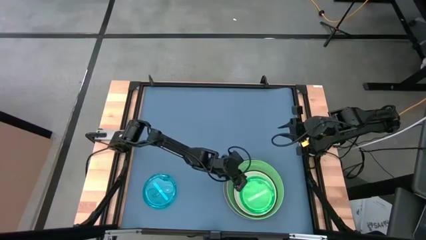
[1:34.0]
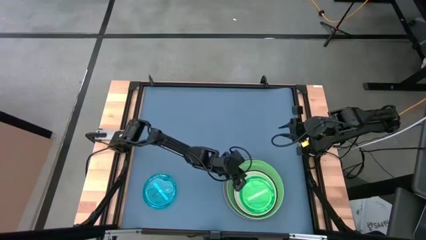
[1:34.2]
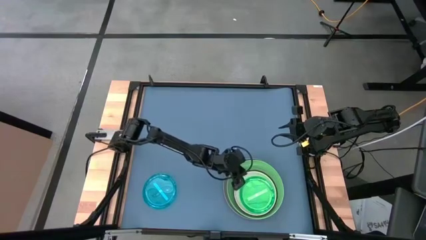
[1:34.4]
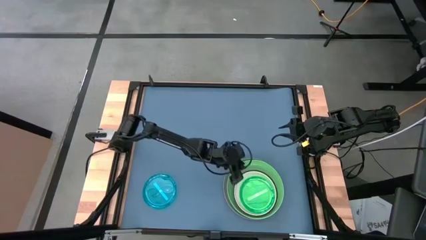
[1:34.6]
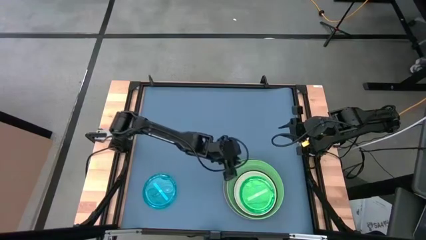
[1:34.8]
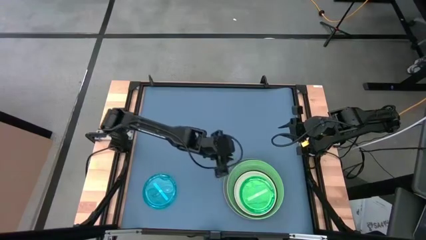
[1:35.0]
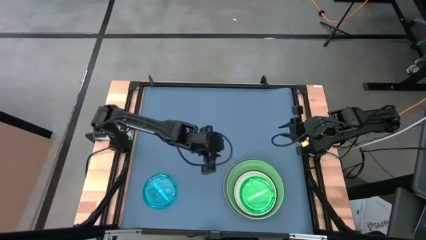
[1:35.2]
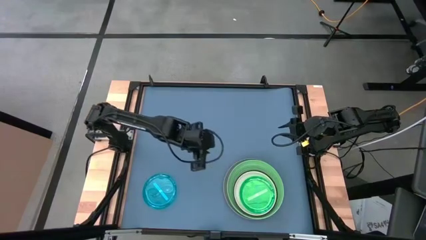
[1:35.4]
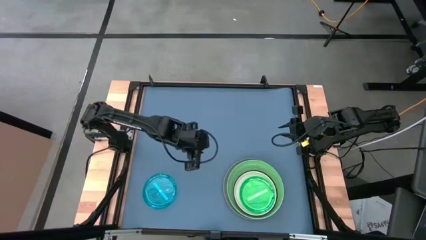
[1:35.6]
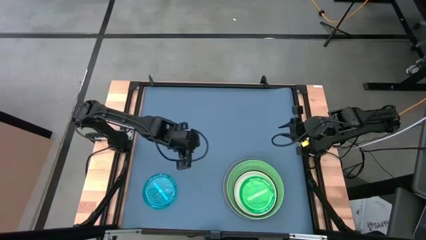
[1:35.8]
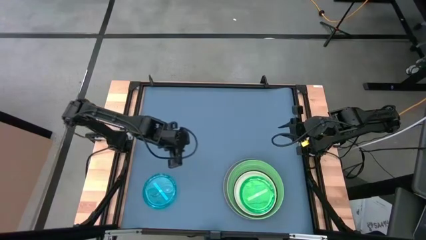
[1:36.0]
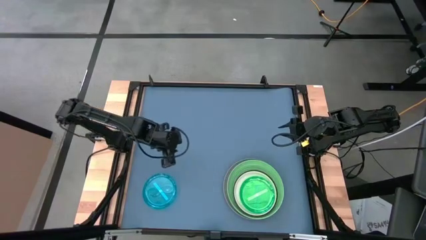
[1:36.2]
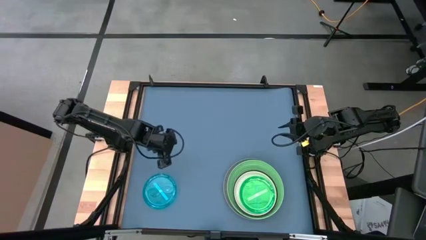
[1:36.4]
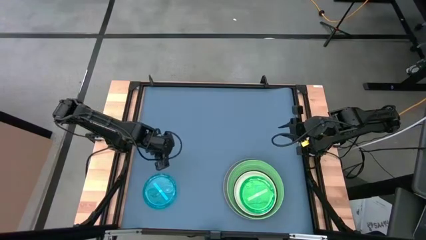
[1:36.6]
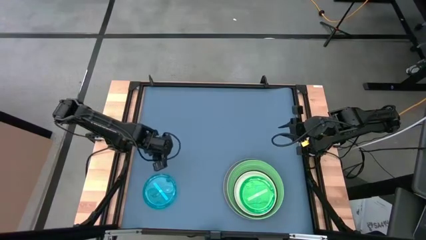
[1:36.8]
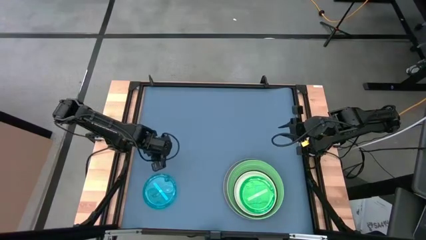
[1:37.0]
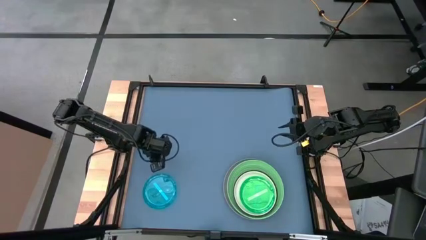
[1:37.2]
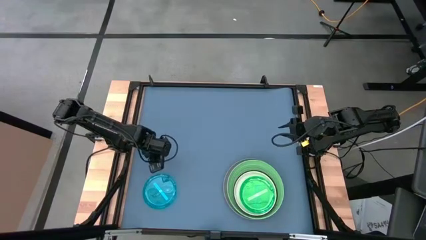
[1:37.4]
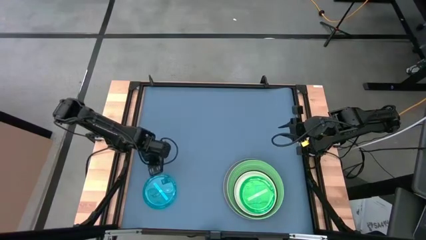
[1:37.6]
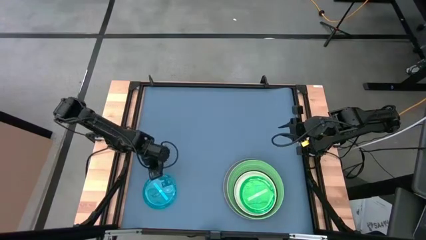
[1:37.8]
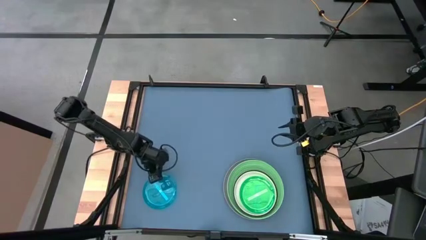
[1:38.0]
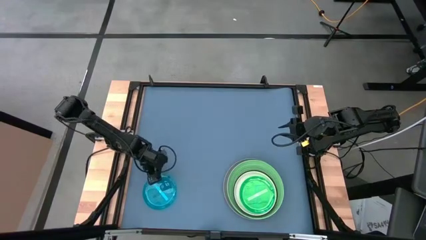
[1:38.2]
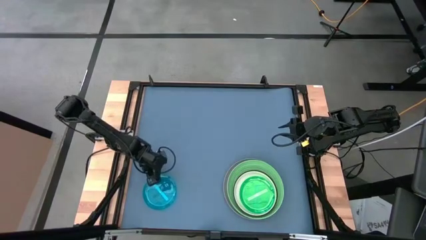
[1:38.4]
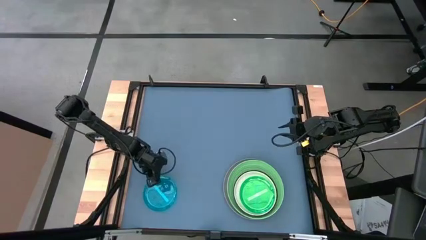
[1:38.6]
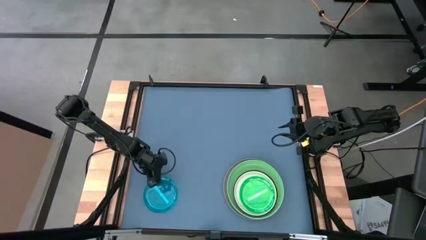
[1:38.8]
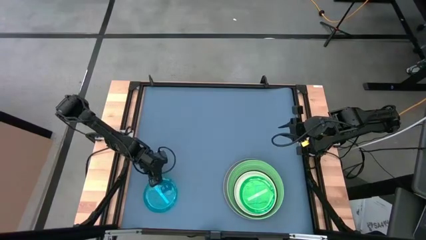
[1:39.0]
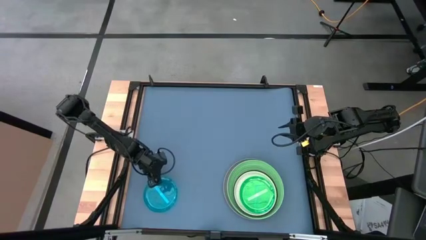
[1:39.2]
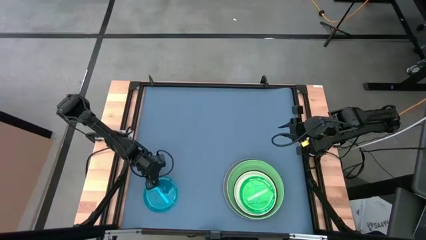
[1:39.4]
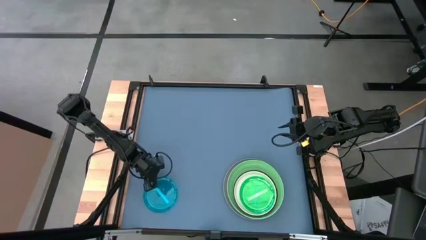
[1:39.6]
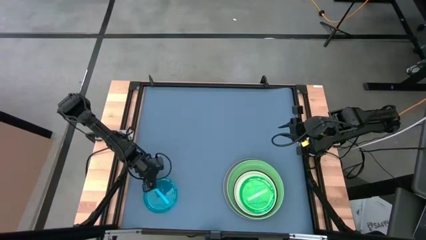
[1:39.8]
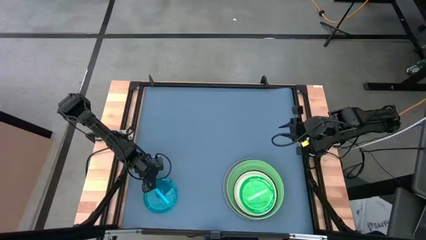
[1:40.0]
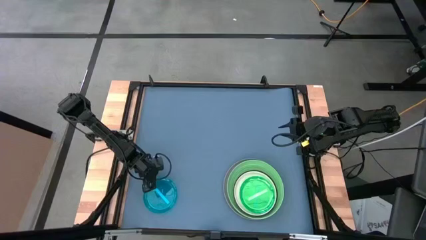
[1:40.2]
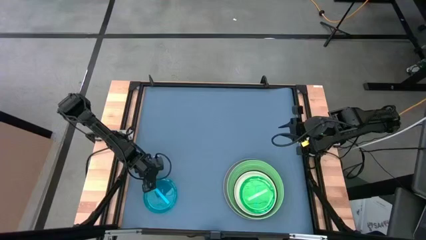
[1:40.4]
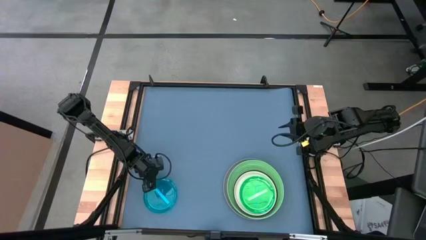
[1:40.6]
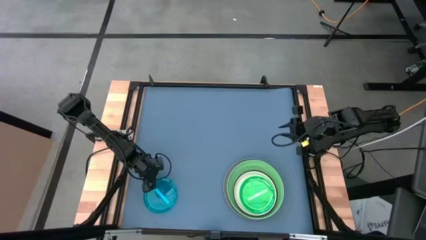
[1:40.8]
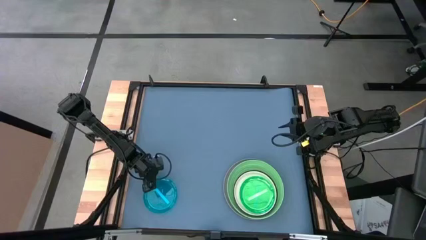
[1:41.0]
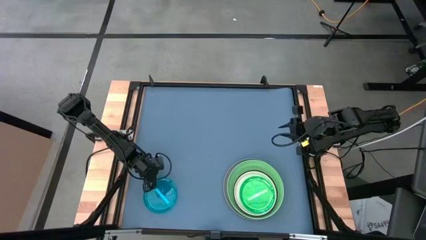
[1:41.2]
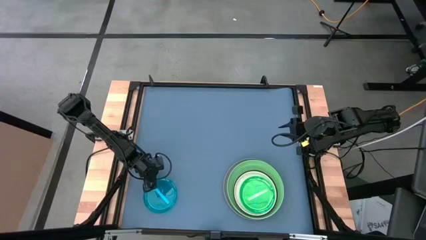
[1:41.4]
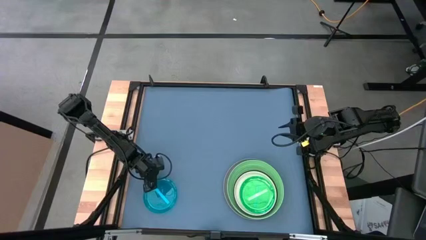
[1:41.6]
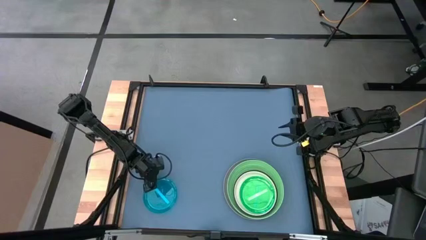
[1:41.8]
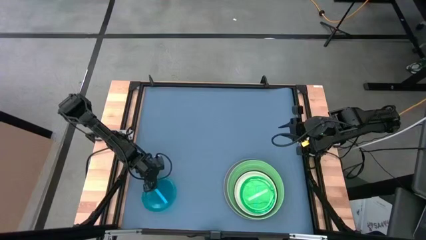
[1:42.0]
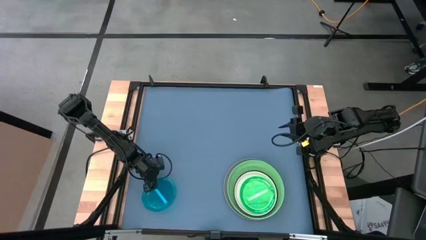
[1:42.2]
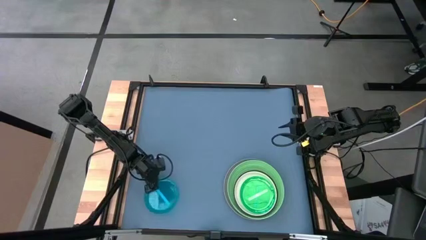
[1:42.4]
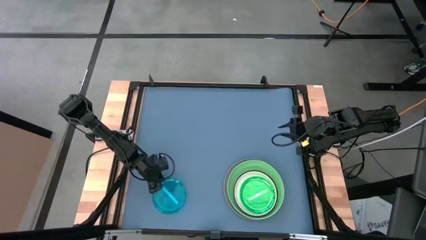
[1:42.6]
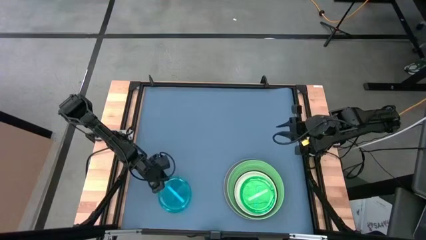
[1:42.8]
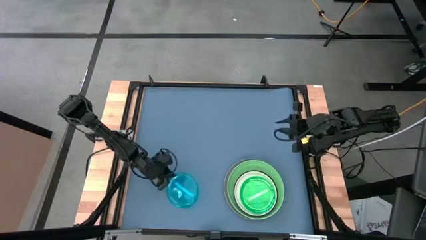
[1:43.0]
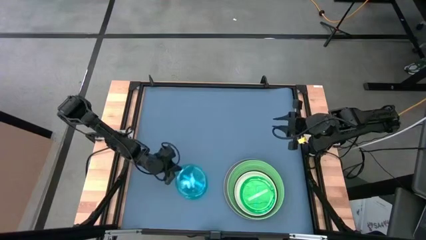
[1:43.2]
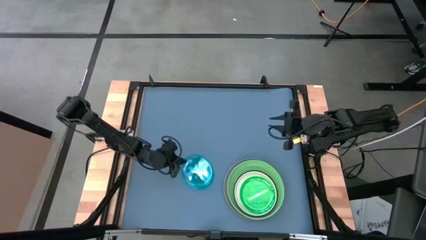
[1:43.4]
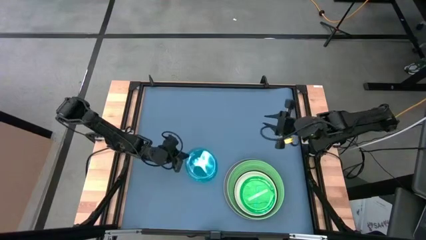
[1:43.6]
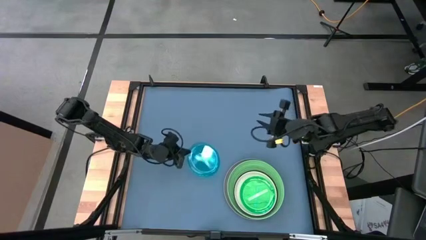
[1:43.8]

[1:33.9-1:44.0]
Task: Stack plastic plates
Stack the blue plate on top of the small green plate

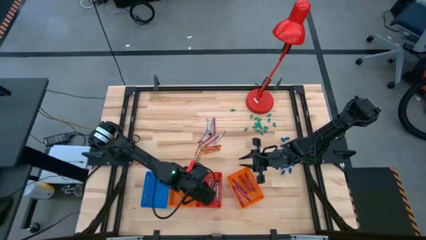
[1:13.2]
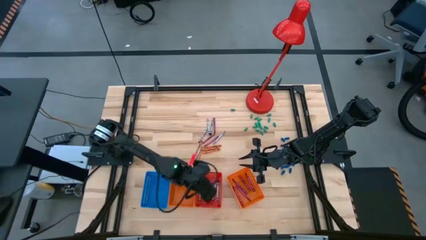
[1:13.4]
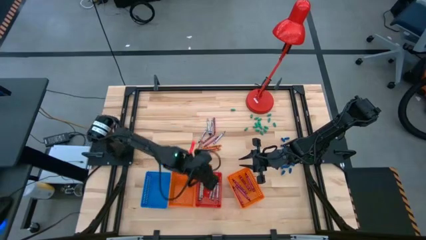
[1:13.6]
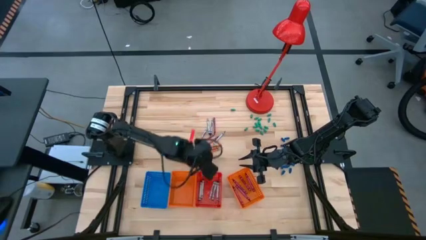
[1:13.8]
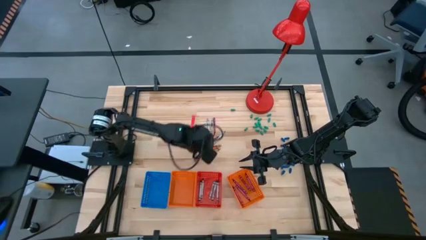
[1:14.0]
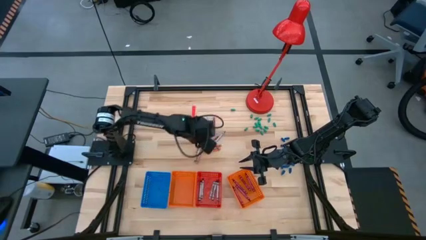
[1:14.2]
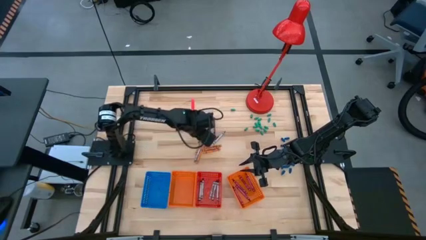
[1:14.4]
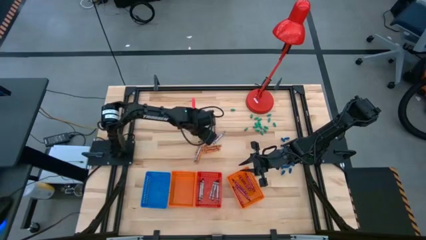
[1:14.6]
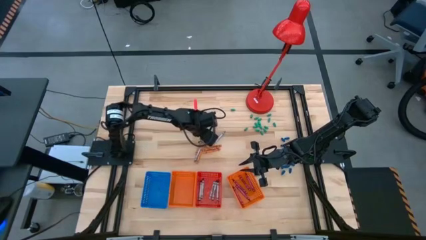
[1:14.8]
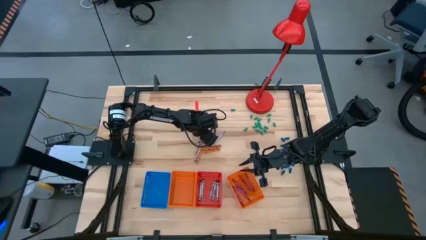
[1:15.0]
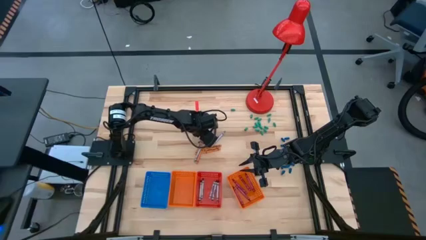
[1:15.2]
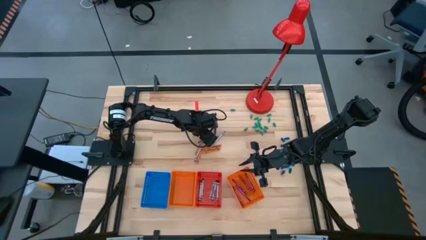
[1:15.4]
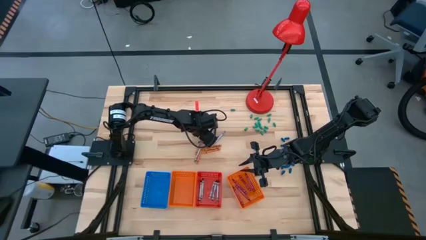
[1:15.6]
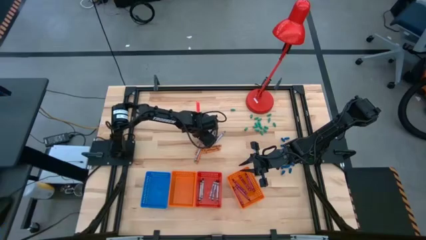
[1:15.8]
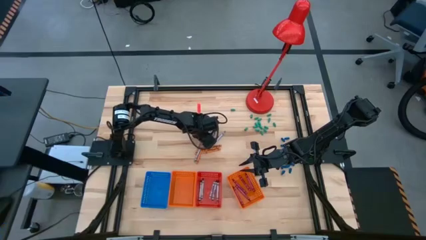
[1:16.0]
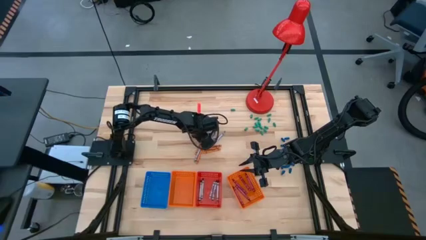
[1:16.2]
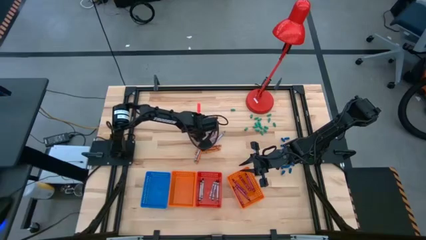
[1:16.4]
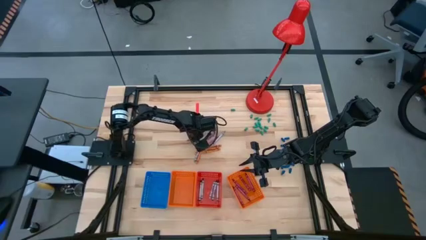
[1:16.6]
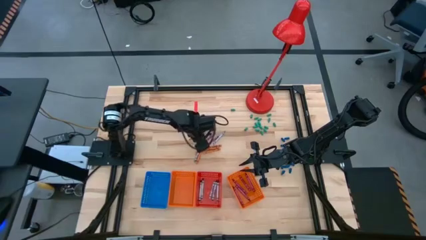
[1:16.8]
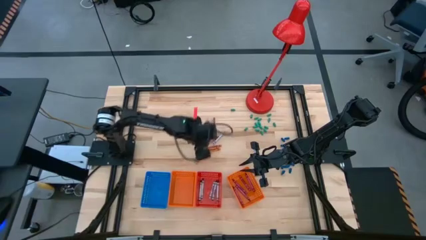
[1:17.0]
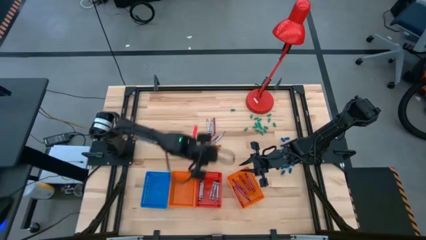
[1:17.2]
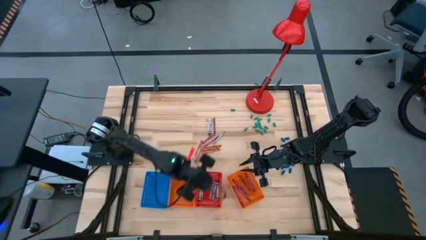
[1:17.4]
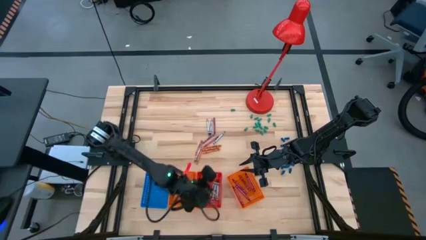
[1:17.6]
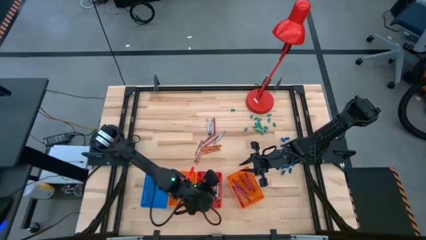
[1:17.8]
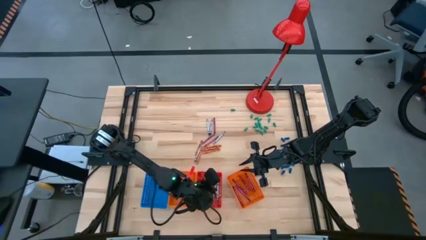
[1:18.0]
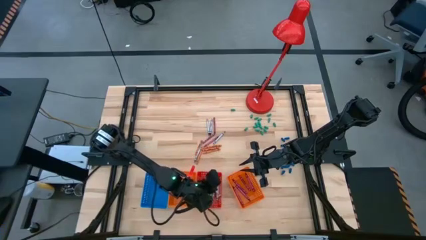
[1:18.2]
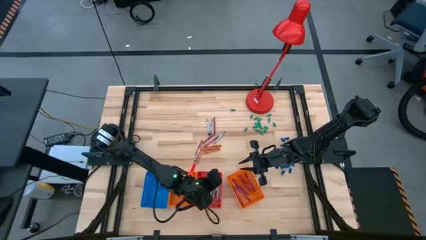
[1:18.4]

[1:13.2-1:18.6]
Task: Sort crayons
Put the black crayon into the red bin

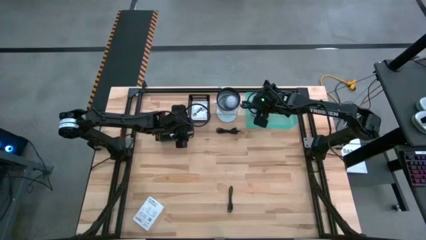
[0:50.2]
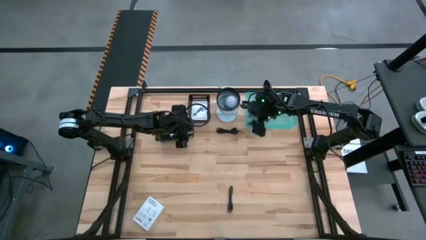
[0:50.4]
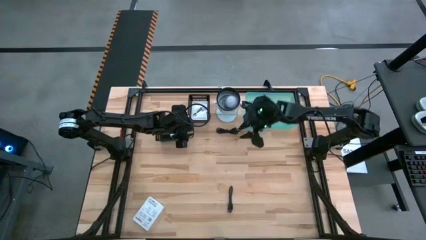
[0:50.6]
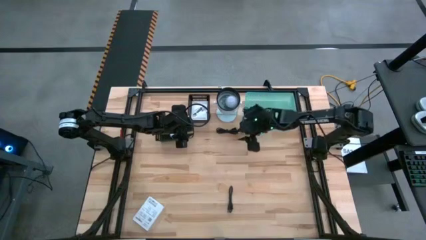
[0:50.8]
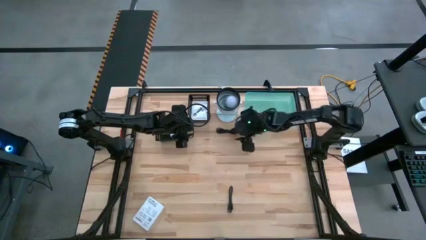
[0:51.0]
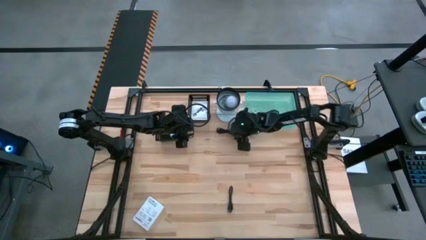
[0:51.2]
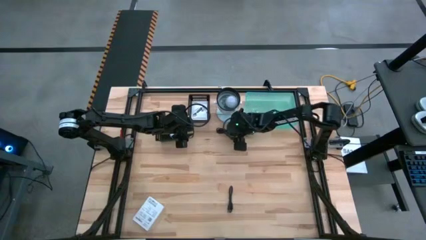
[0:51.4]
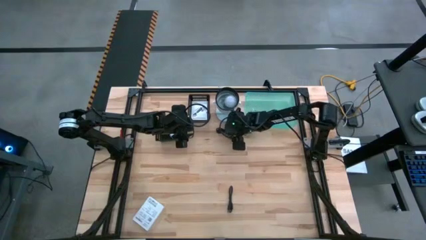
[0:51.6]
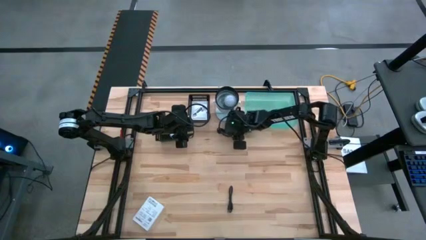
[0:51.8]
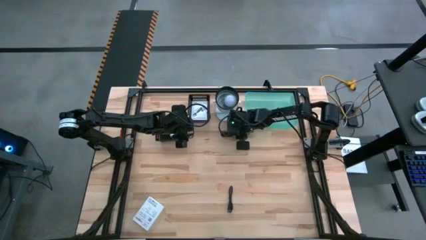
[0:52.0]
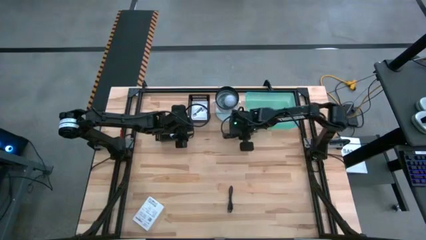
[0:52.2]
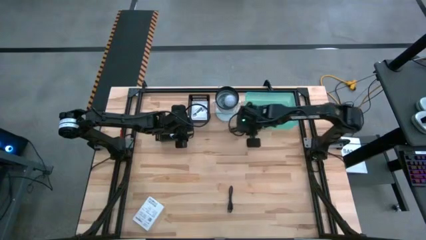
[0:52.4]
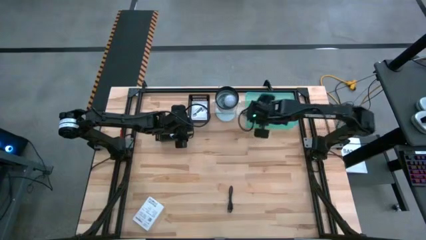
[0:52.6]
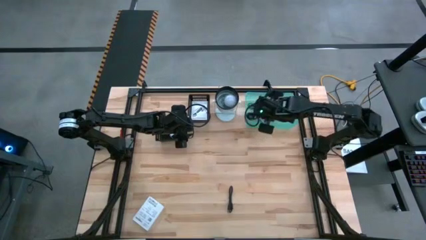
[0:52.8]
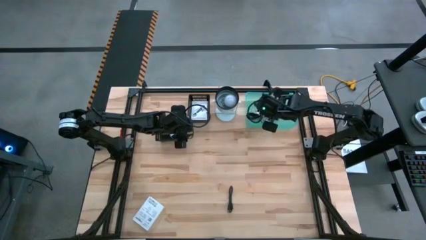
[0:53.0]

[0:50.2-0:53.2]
Task: Pick and place items into bin
Put the top black charger cable into the light blue bin
